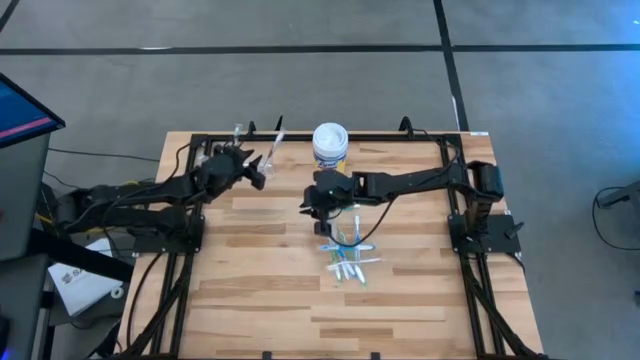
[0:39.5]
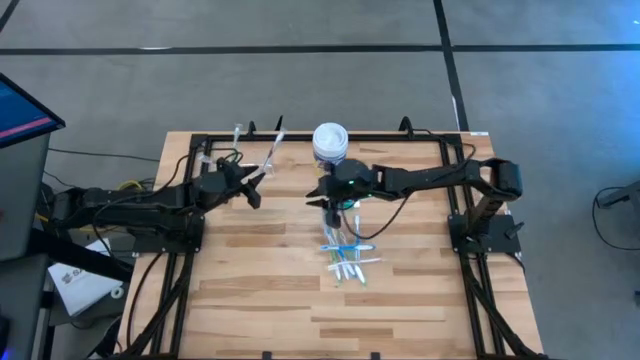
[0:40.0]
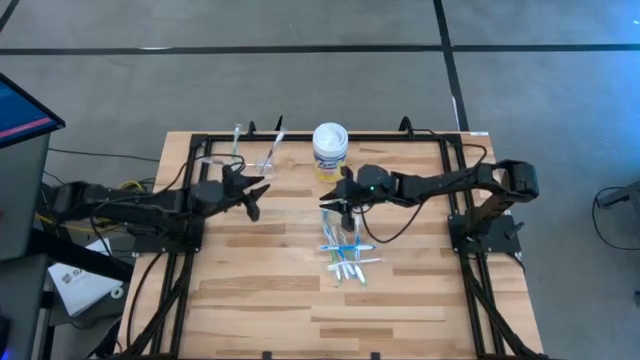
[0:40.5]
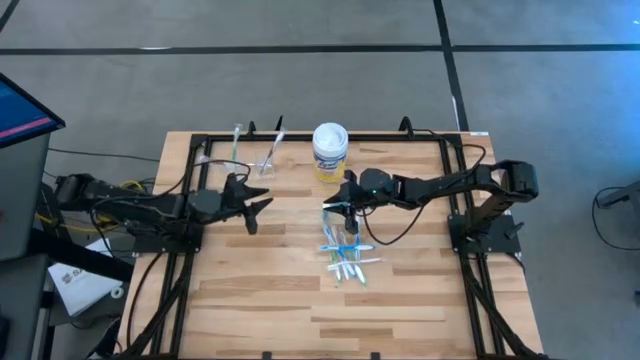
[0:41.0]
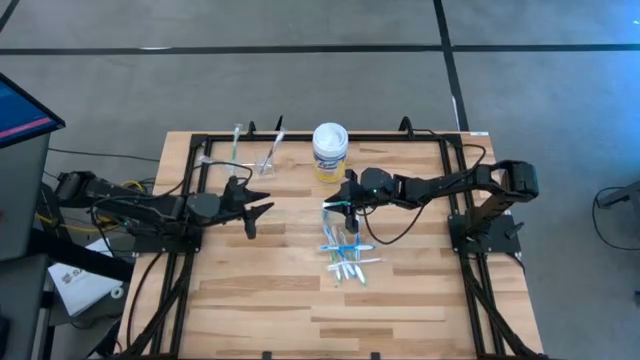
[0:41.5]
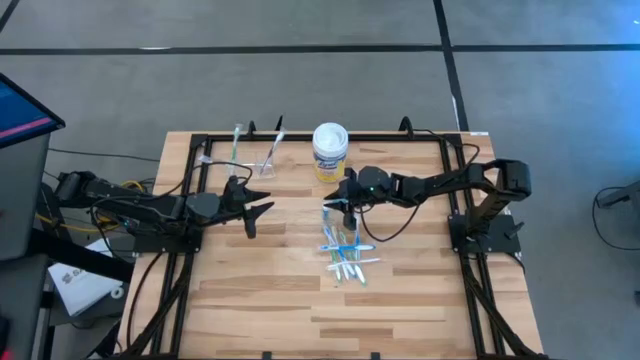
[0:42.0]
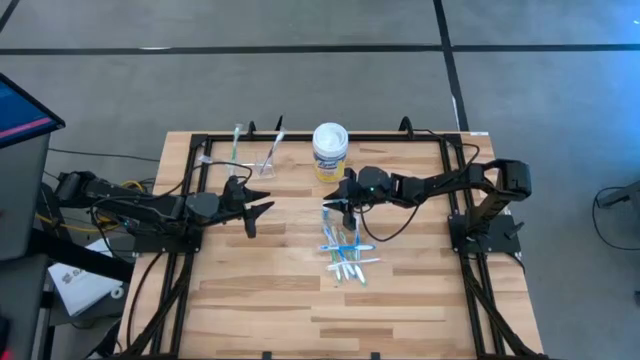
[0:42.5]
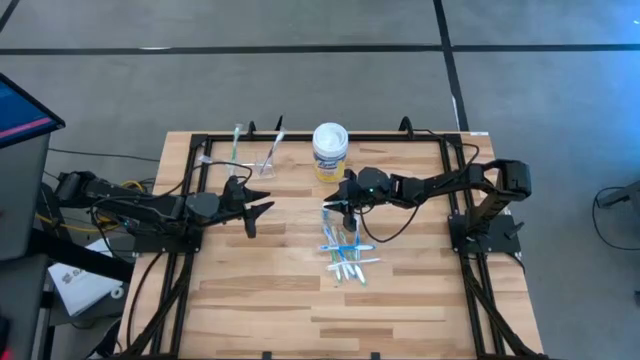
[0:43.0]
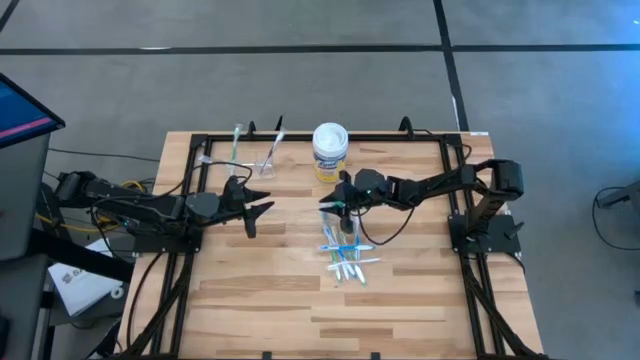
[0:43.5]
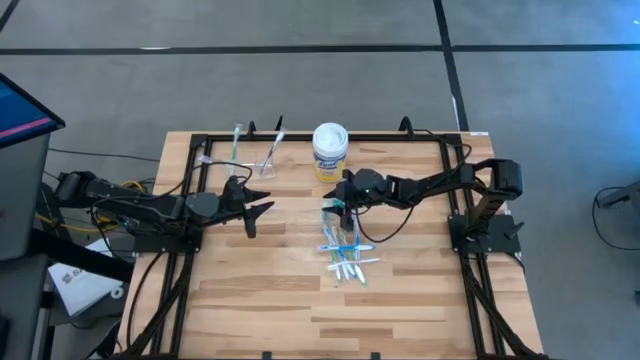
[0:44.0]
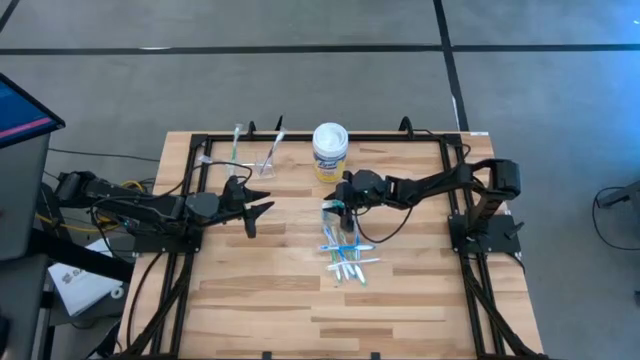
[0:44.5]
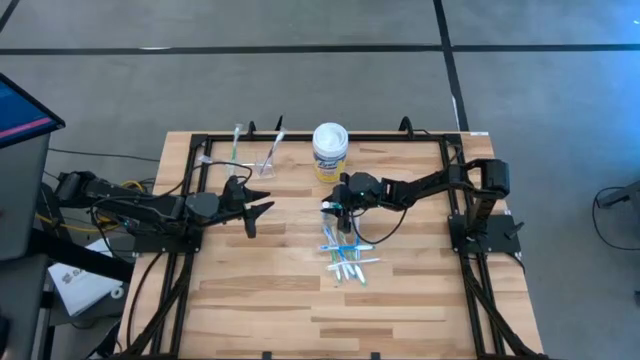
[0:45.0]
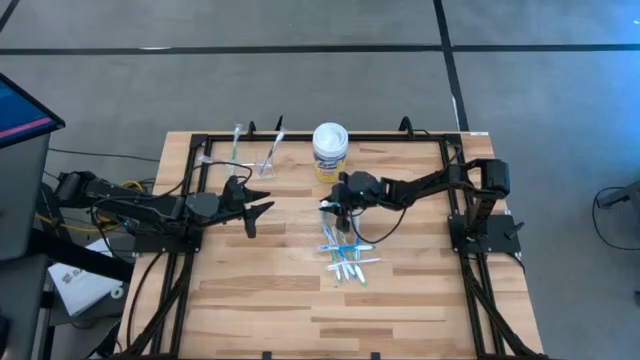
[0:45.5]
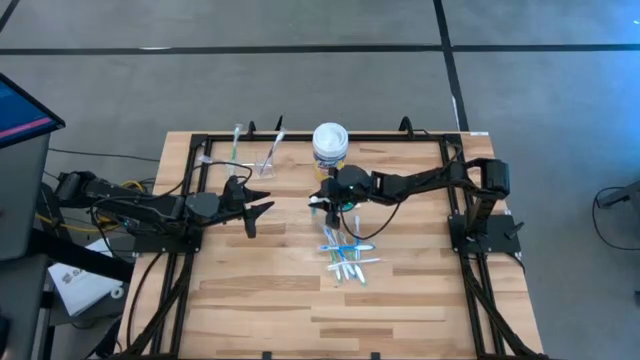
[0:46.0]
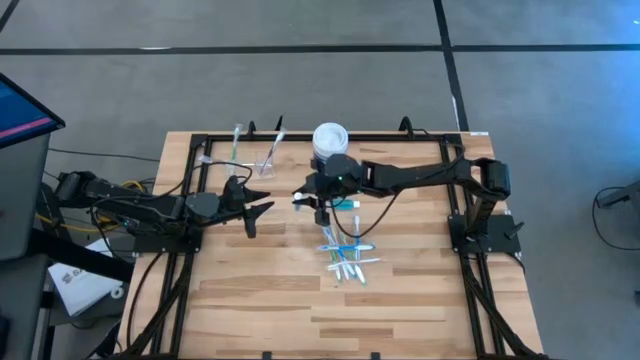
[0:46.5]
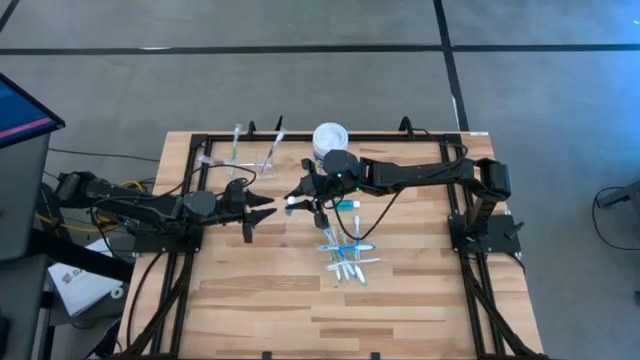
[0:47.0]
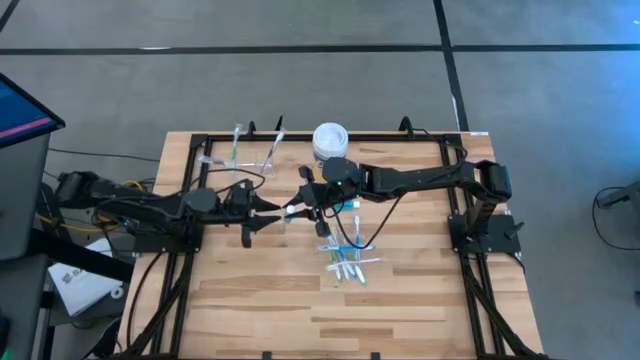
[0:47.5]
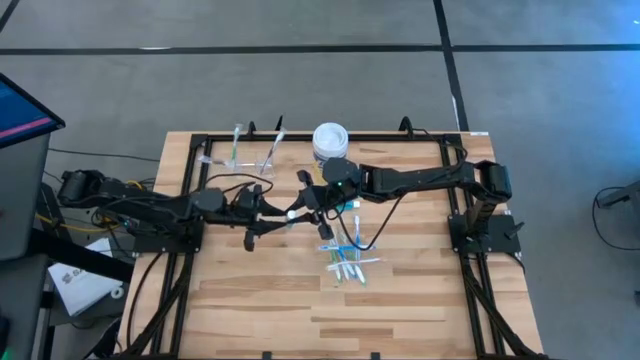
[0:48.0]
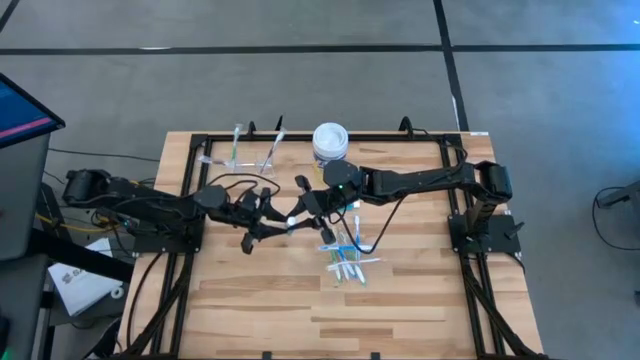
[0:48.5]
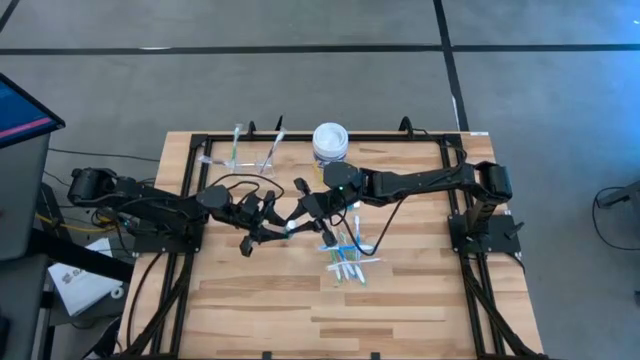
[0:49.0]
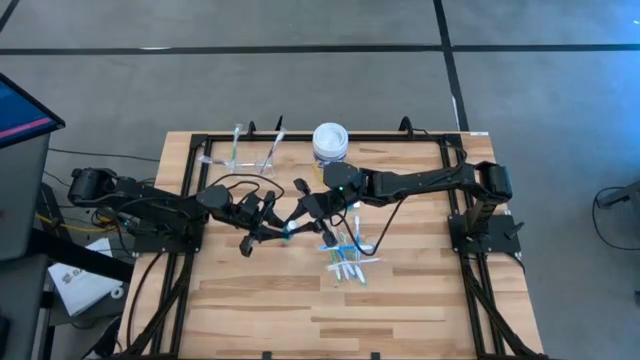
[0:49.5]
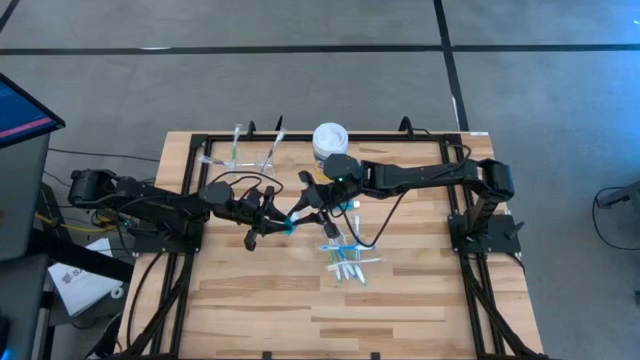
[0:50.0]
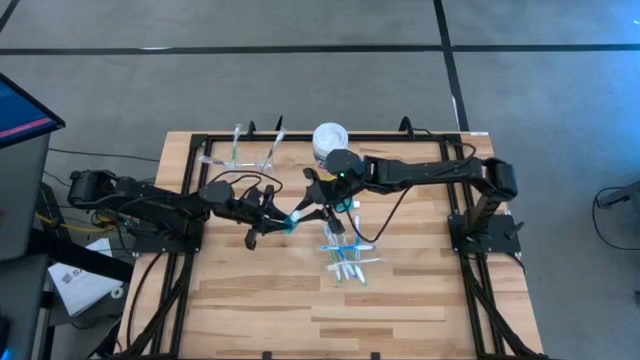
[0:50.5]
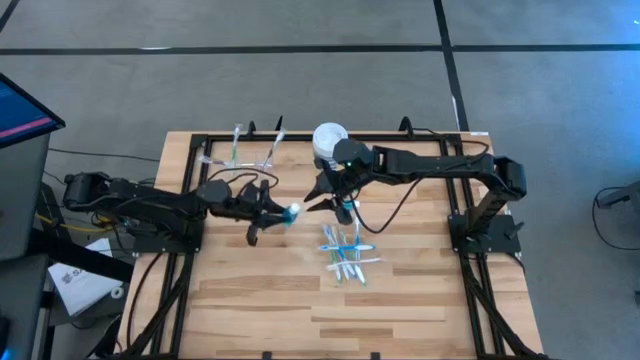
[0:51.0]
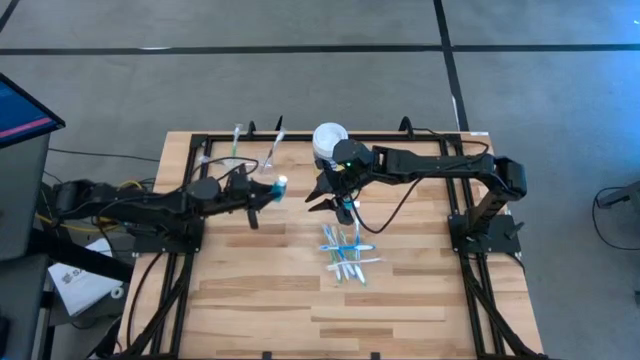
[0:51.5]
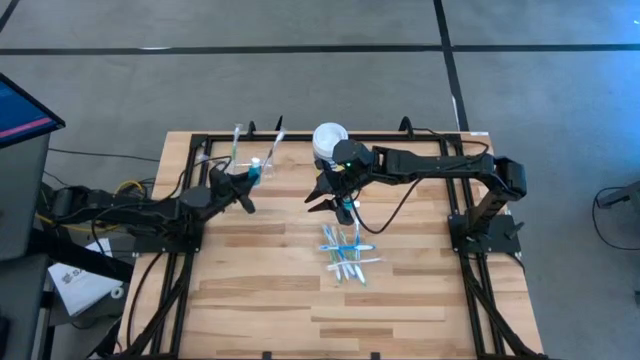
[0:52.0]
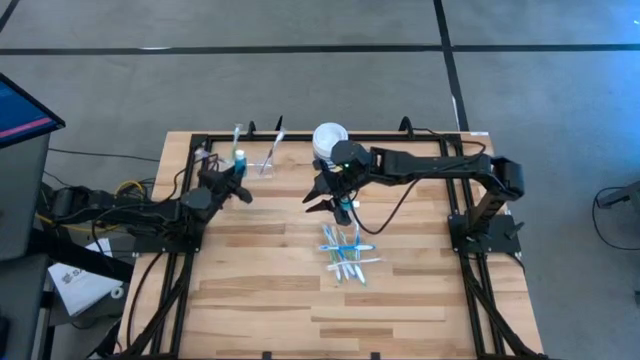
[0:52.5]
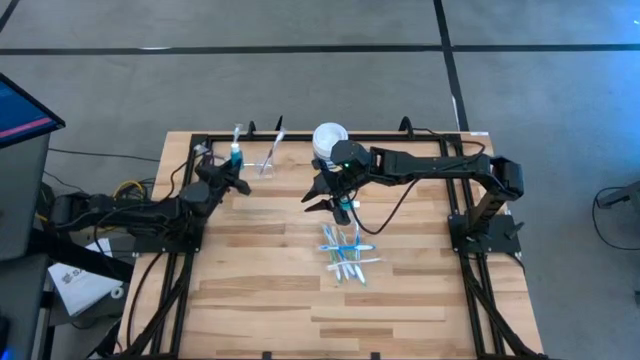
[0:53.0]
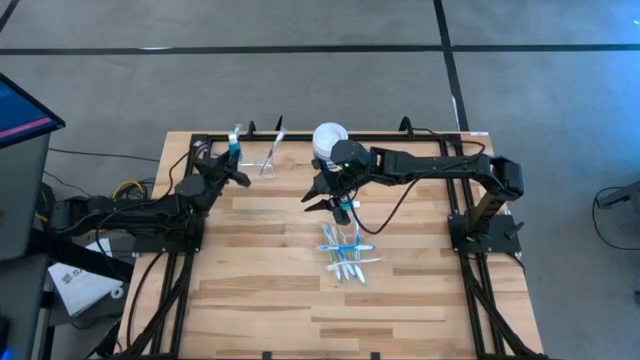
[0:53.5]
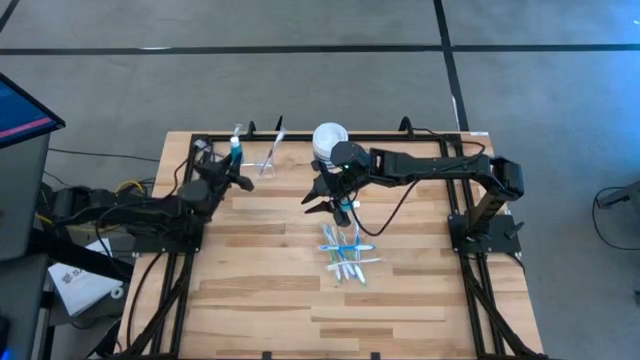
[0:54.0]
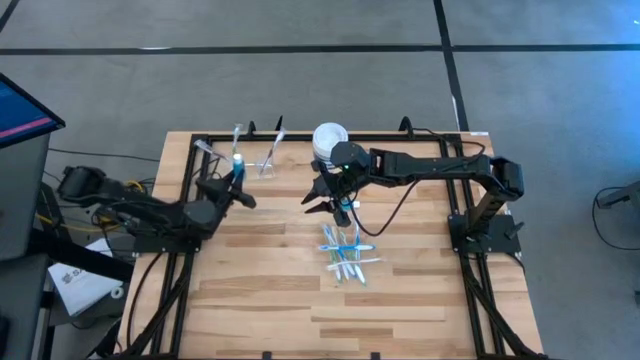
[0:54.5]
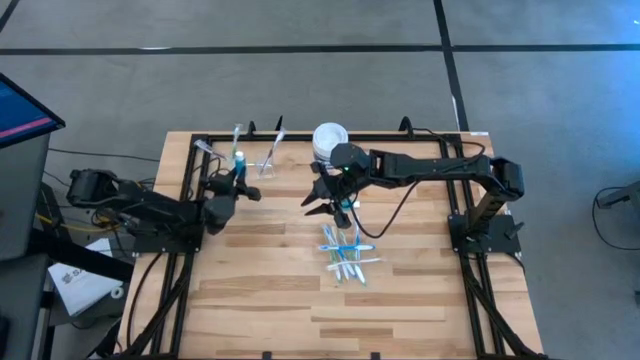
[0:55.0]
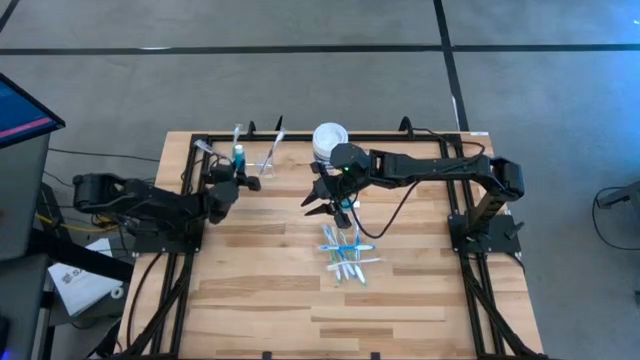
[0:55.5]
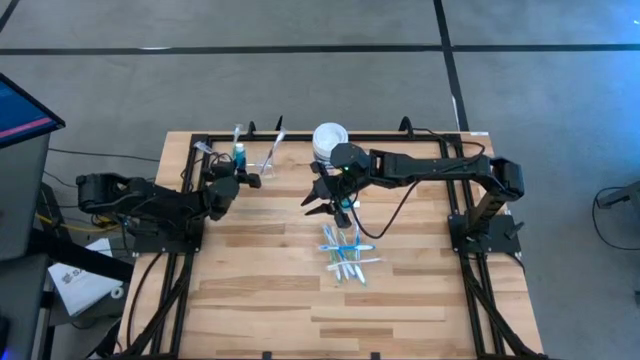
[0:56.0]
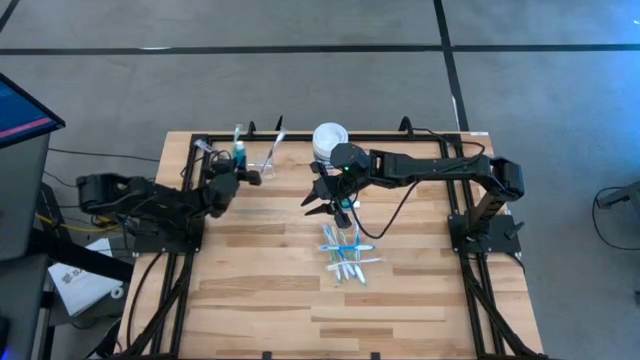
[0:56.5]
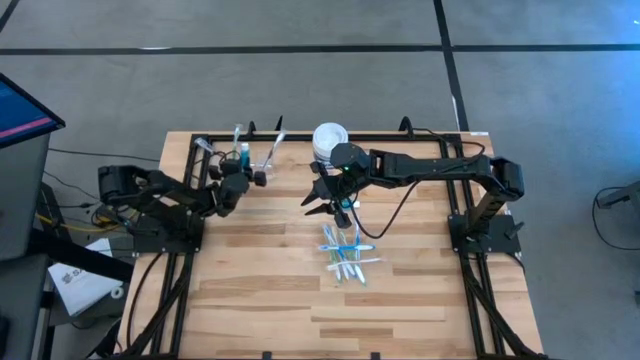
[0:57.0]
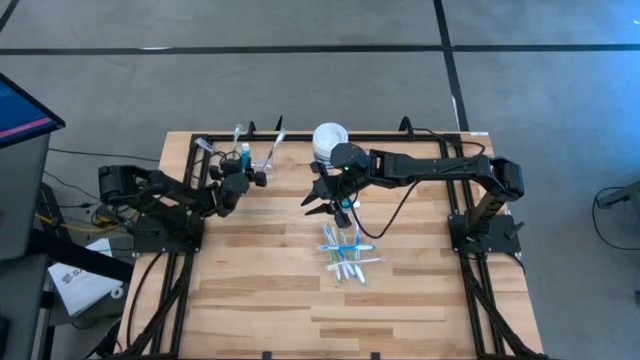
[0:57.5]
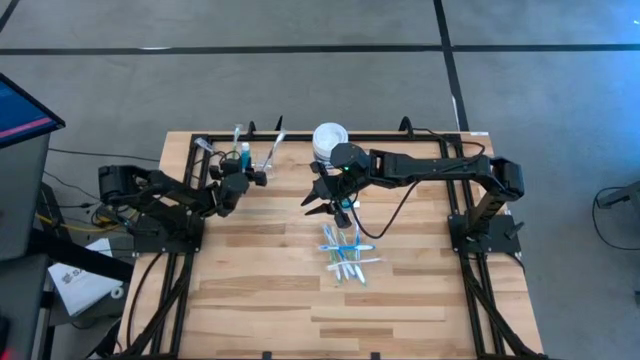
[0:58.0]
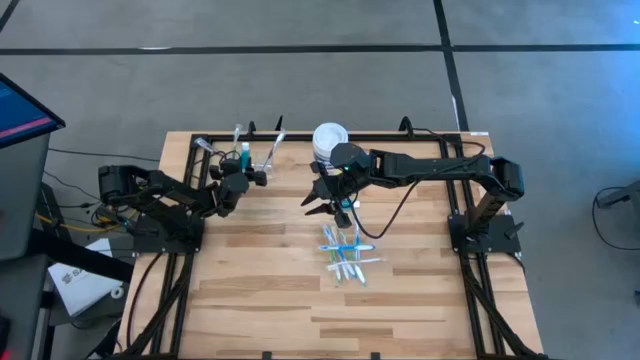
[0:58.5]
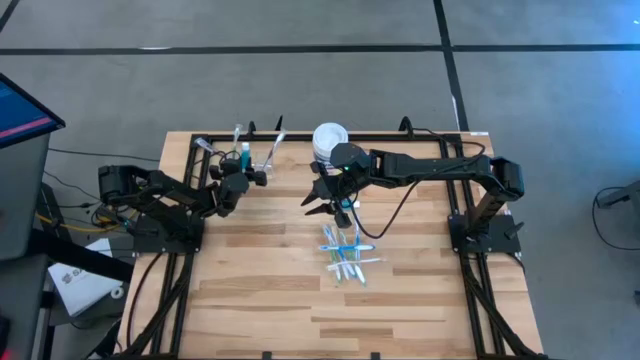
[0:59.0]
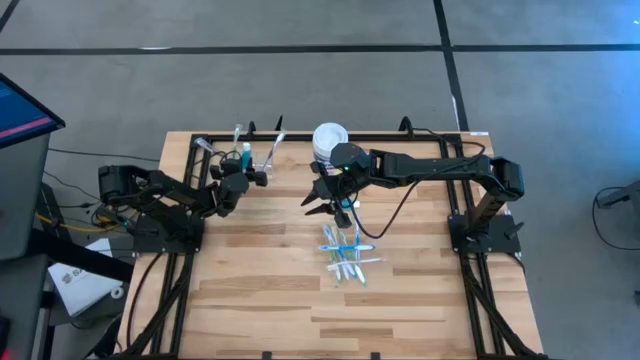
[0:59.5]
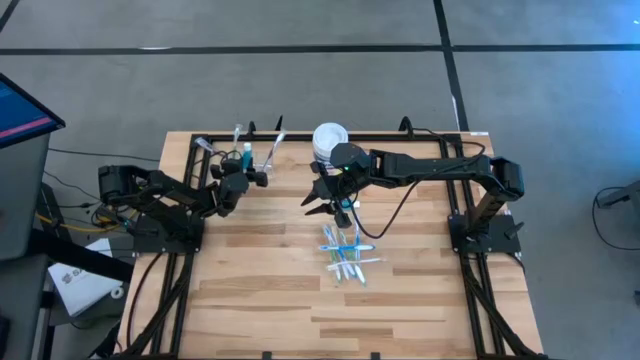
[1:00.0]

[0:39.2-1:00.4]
Task: Pick & Place toothbrushing station
Put the mouthwash into the transparent organizer

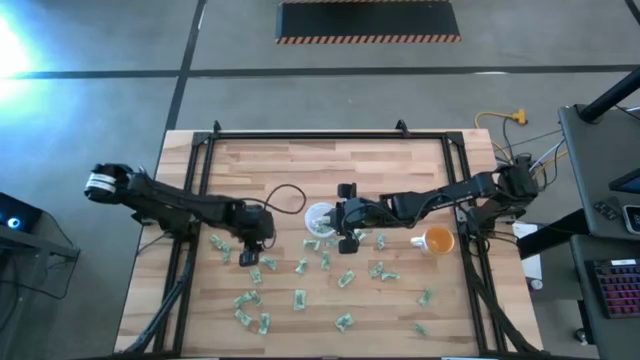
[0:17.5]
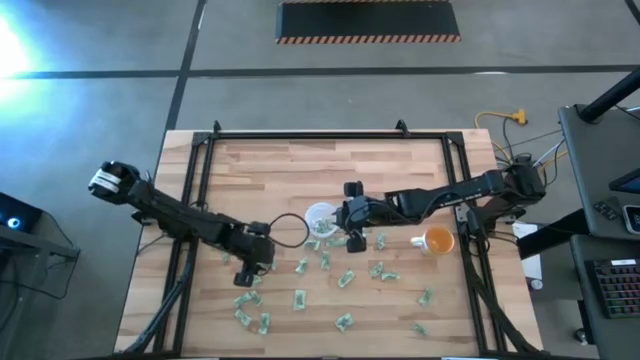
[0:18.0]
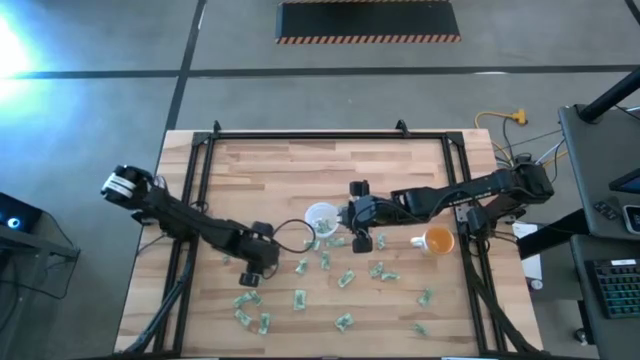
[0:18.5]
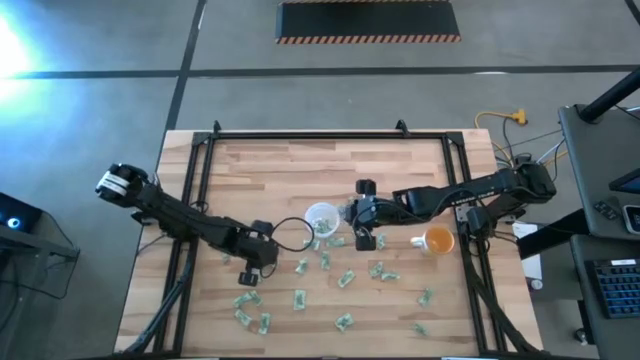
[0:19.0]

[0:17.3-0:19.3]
Task: Pick and place Stevia / Truvia into bins
Put the light green stevia packet into the transparent container
